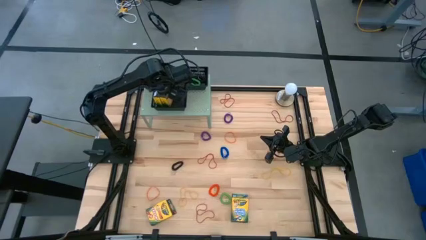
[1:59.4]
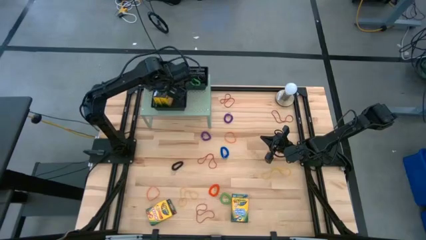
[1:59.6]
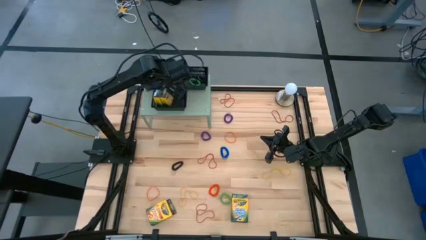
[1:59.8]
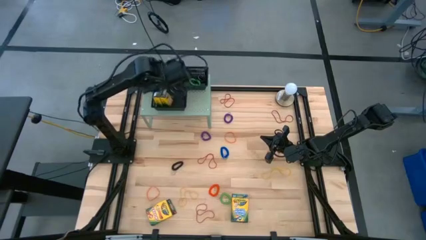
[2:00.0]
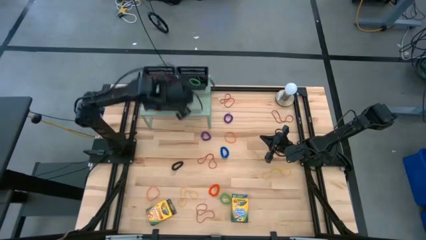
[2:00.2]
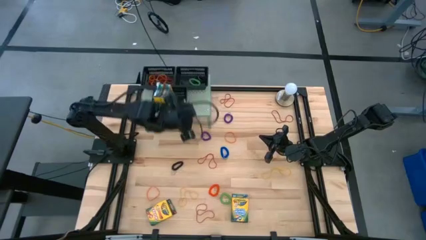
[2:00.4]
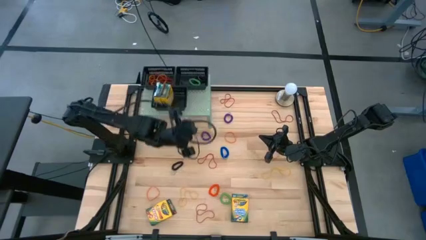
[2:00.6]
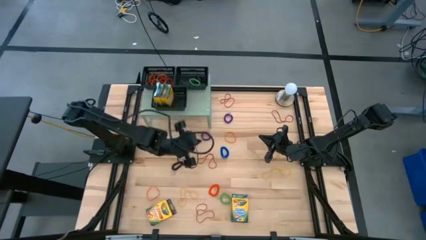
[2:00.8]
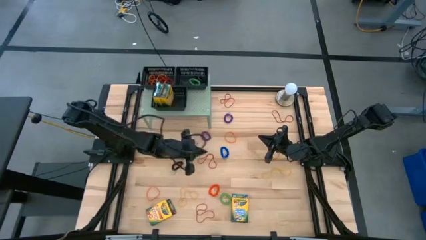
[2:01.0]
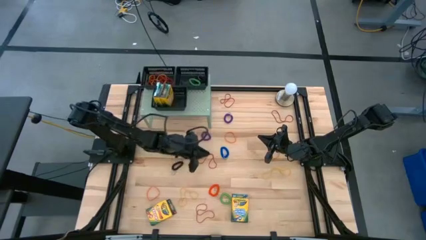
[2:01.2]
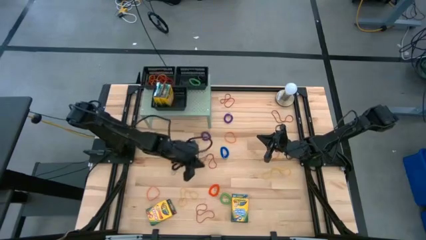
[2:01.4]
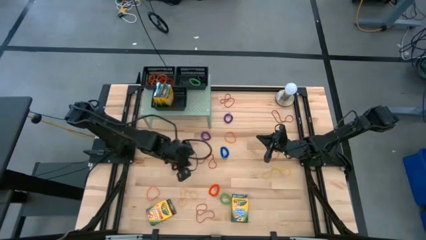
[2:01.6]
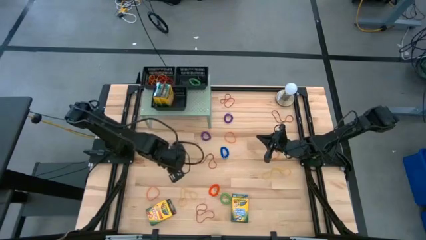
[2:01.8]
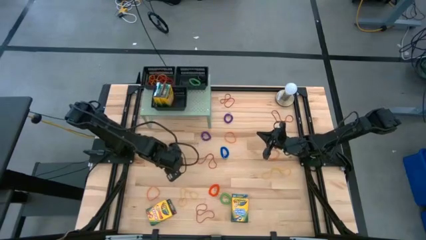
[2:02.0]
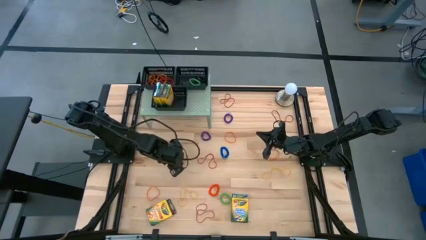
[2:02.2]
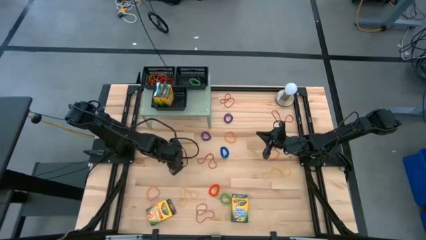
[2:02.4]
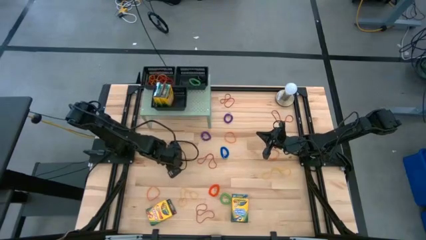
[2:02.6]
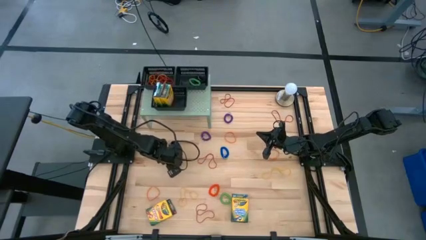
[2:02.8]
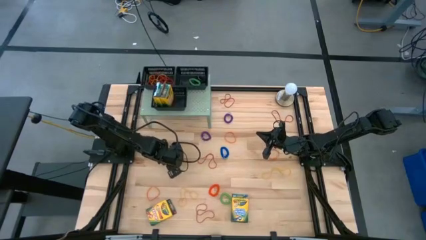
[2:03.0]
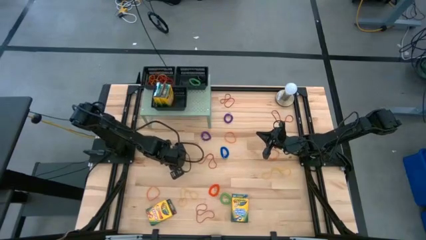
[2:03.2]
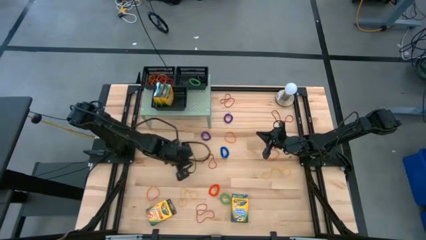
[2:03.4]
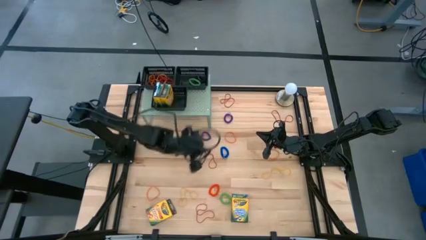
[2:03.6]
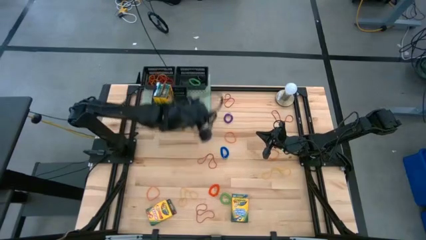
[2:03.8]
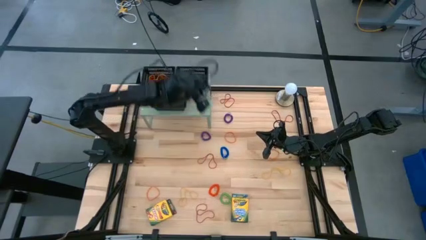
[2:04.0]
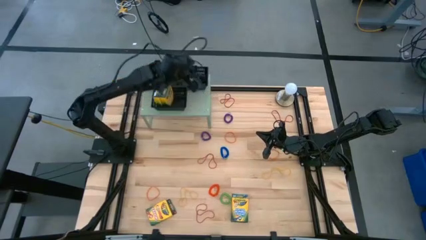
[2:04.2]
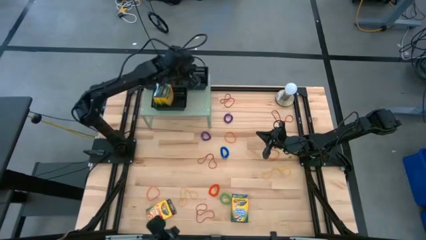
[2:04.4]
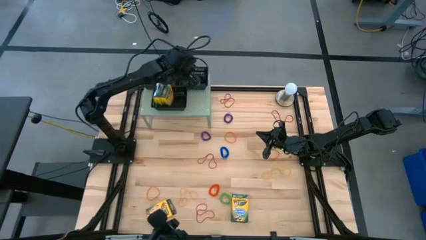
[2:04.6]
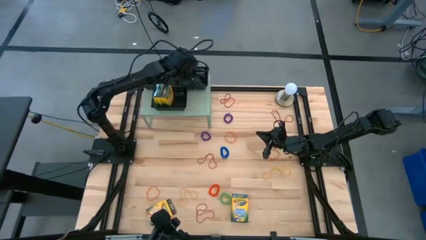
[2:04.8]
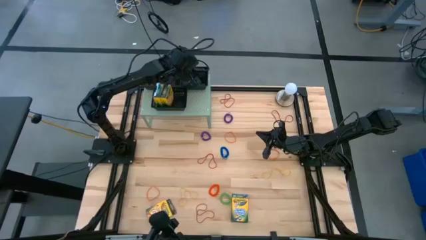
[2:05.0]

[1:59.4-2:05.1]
Task: Pick & Place Office Desk Supplies
Put the black spring keychain into the top right black bin bin

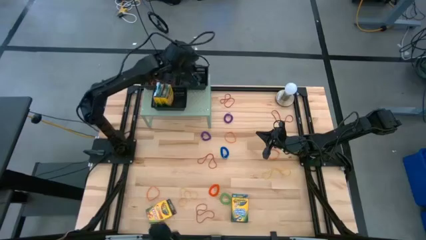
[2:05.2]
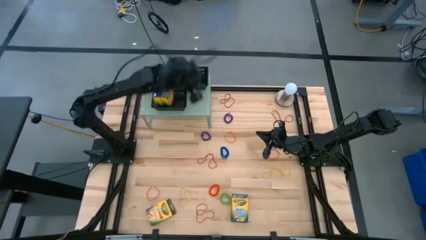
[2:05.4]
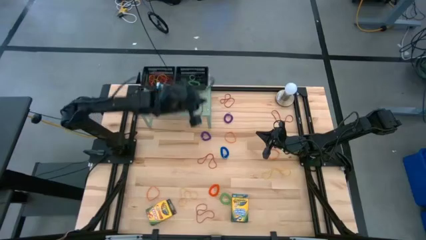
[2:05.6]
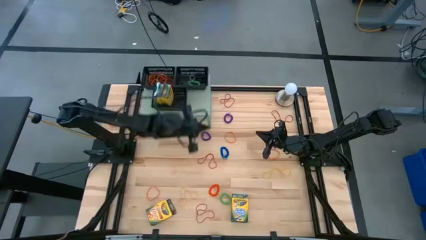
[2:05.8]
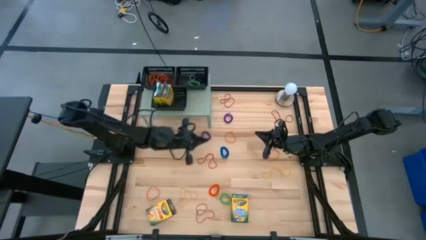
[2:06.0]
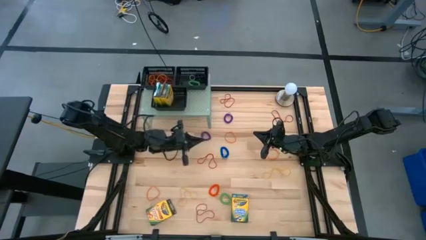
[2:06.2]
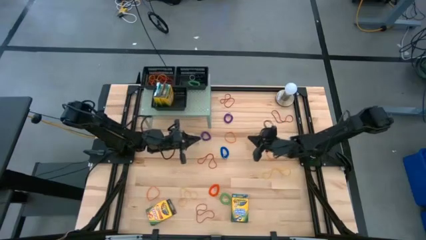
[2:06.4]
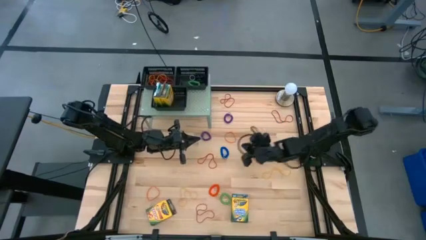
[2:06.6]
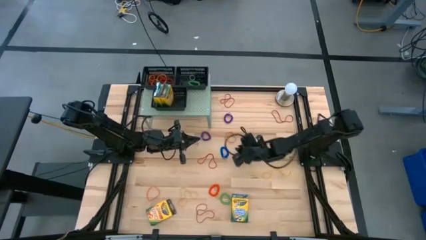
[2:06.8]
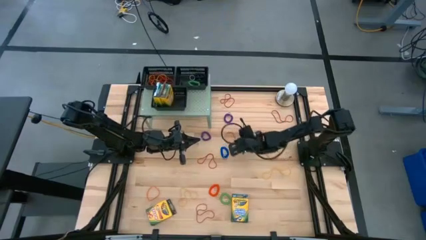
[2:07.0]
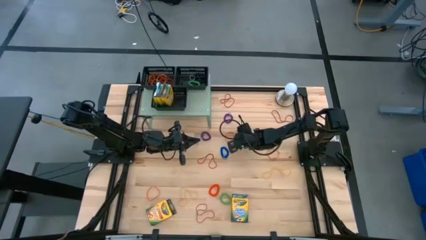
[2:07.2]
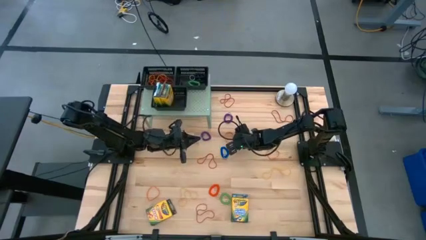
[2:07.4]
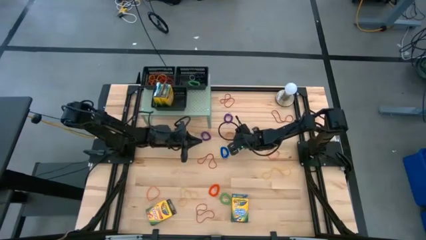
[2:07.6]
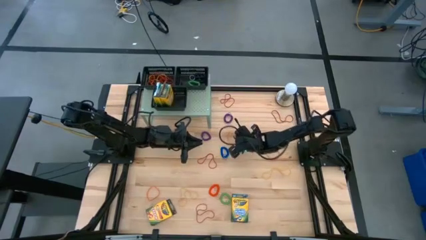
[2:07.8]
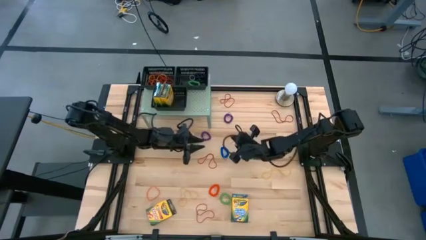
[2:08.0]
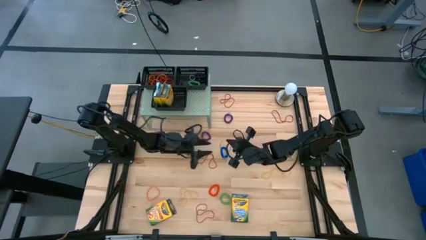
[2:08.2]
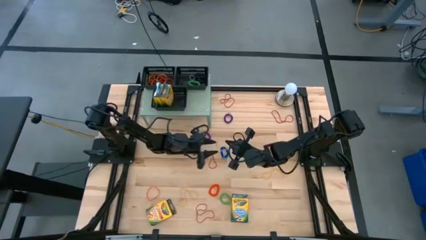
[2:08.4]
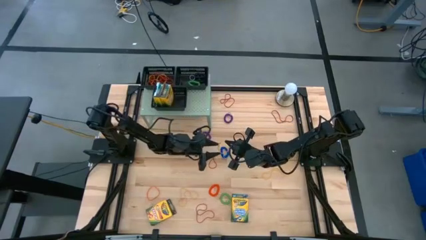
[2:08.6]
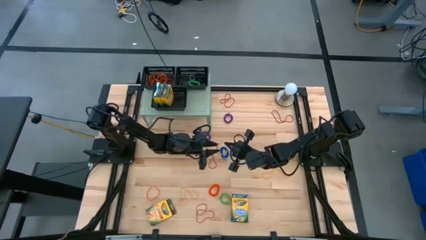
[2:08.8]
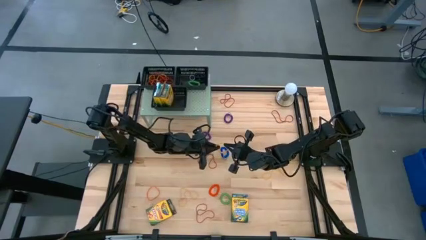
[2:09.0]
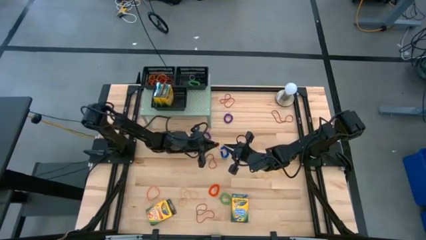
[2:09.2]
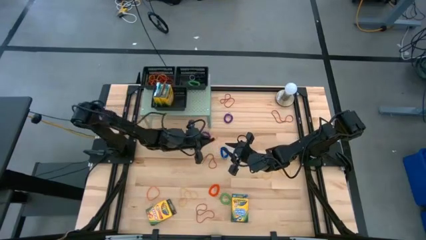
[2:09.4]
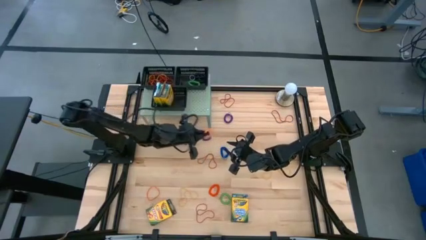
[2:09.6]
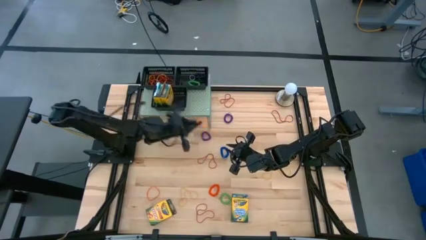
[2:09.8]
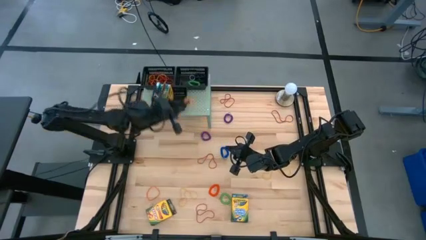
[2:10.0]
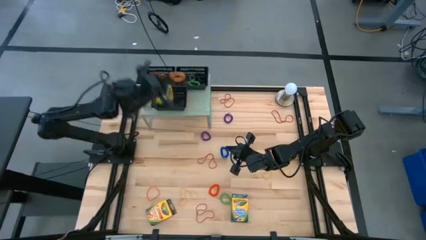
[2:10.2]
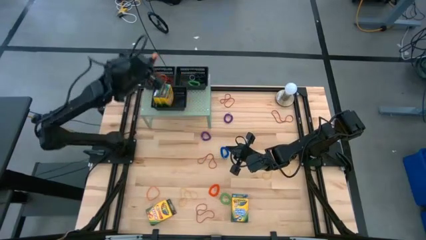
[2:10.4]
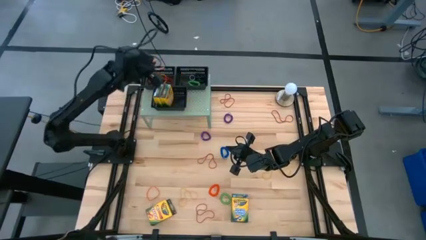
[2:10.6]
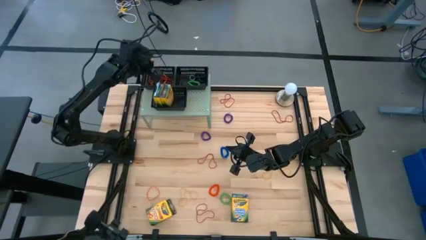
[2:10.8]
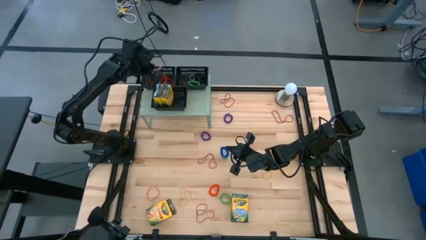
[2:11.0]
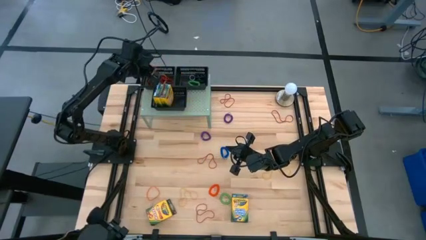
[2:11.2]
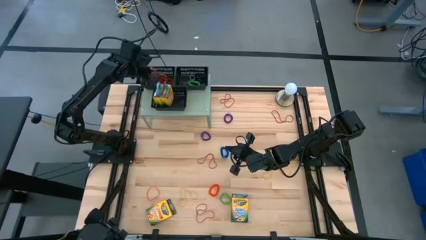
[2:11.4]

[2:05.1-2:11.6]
Put the orange rubber band into the top left black bin on the shelf
